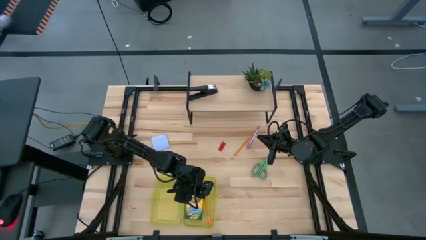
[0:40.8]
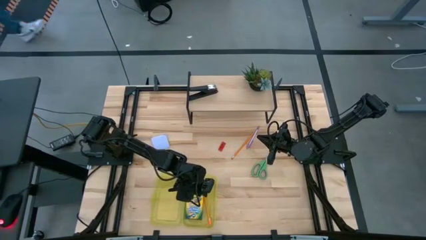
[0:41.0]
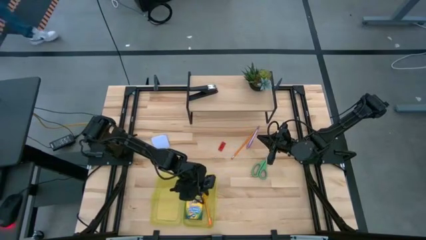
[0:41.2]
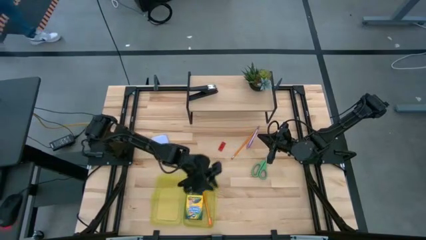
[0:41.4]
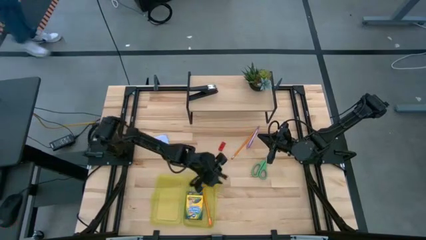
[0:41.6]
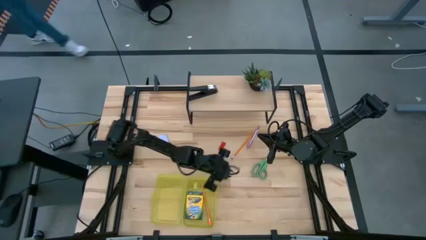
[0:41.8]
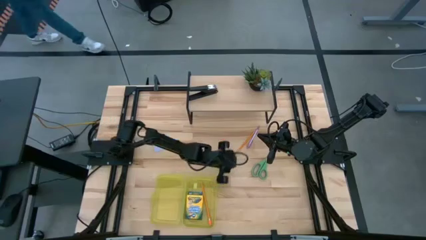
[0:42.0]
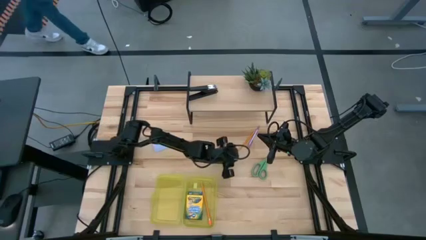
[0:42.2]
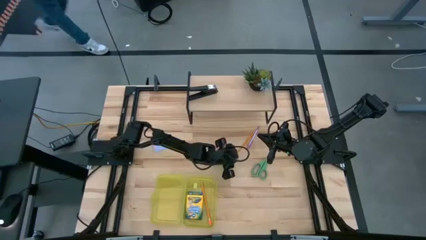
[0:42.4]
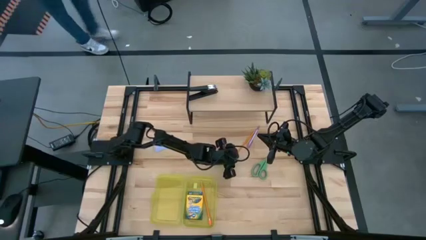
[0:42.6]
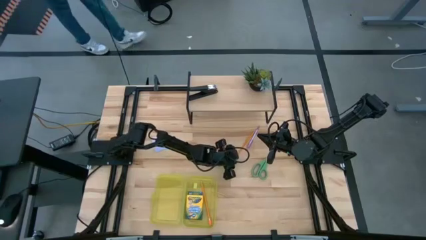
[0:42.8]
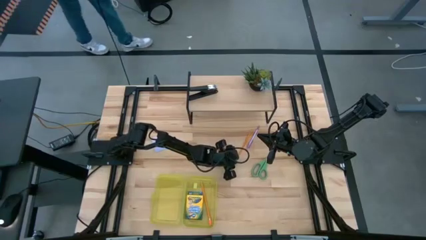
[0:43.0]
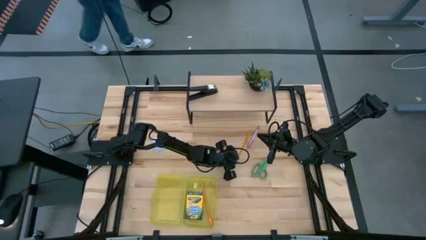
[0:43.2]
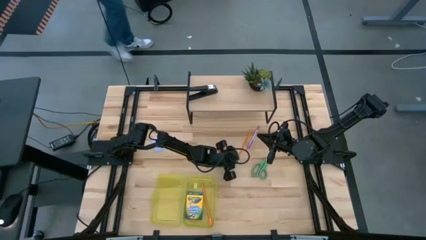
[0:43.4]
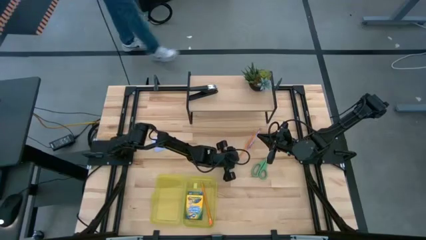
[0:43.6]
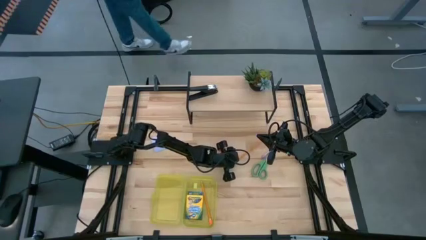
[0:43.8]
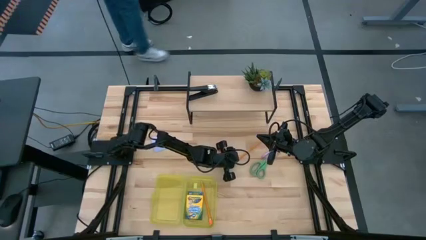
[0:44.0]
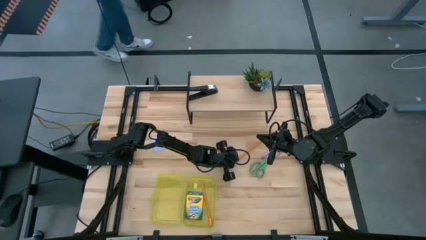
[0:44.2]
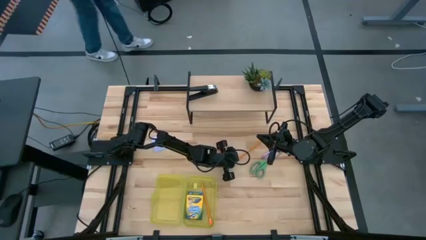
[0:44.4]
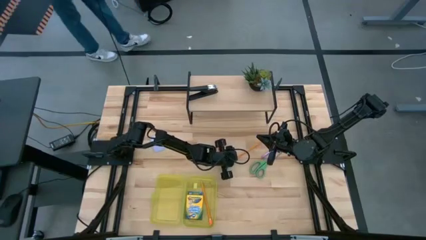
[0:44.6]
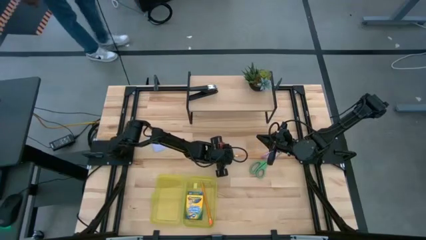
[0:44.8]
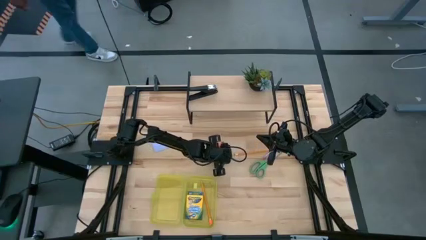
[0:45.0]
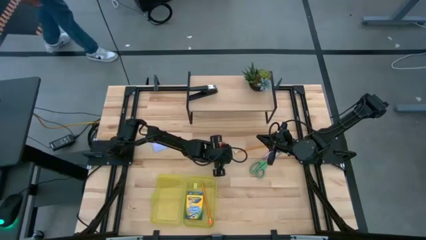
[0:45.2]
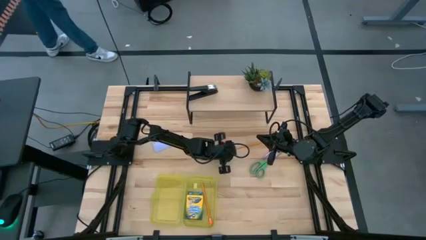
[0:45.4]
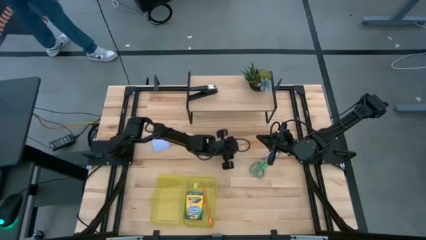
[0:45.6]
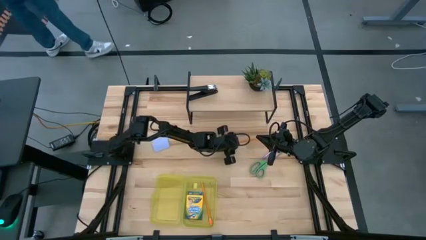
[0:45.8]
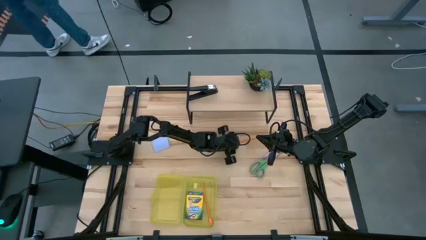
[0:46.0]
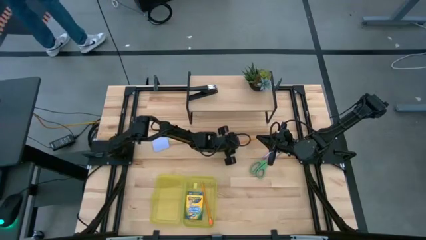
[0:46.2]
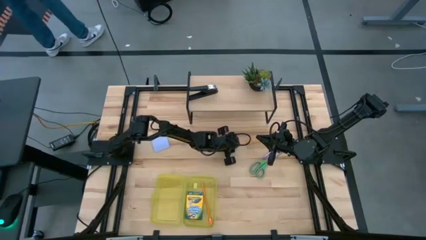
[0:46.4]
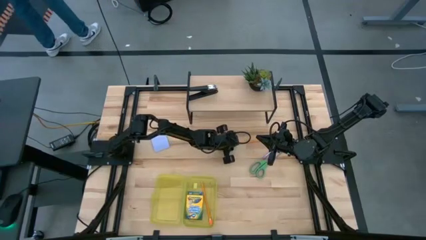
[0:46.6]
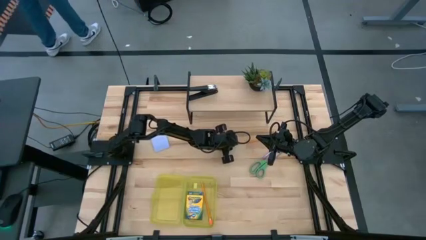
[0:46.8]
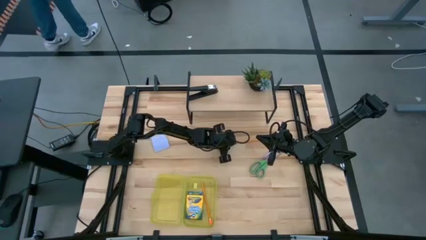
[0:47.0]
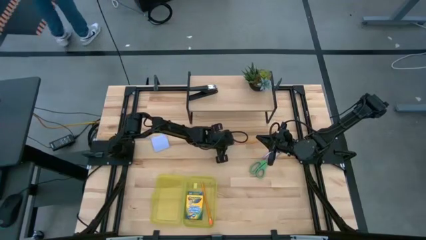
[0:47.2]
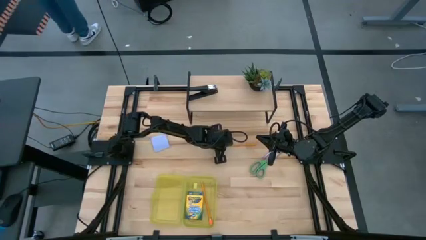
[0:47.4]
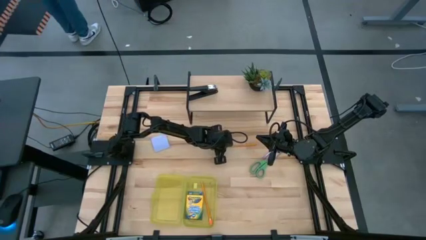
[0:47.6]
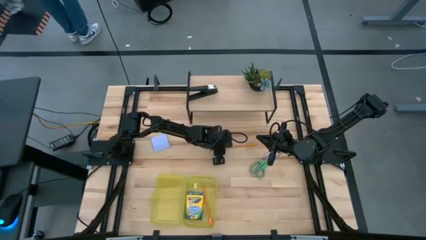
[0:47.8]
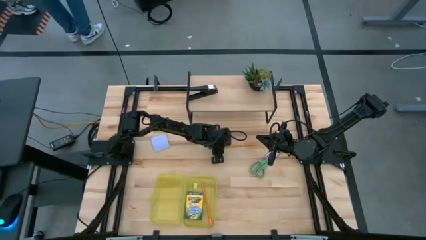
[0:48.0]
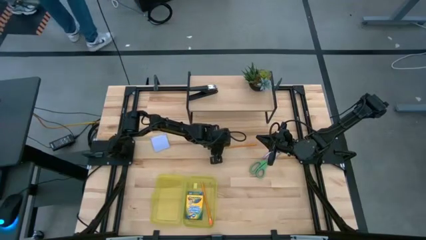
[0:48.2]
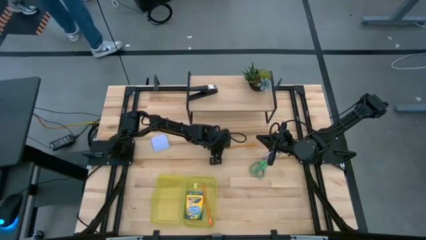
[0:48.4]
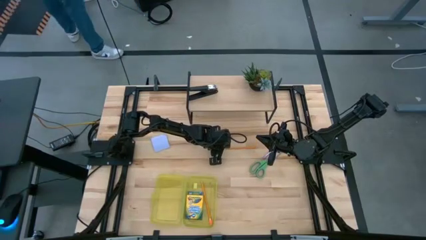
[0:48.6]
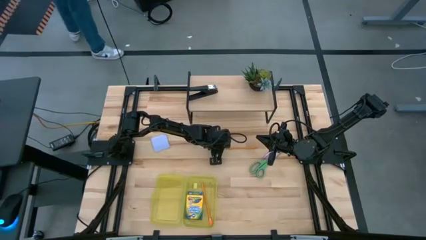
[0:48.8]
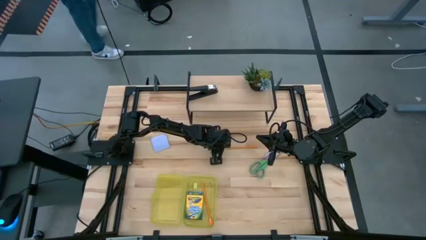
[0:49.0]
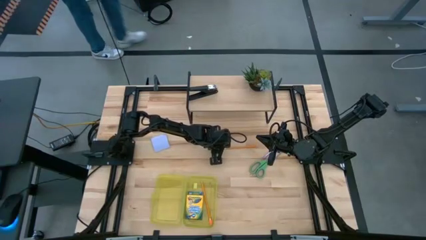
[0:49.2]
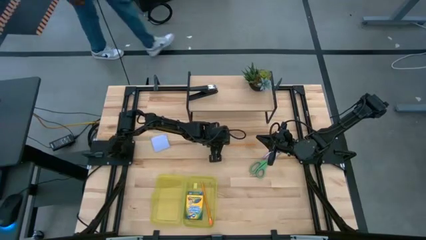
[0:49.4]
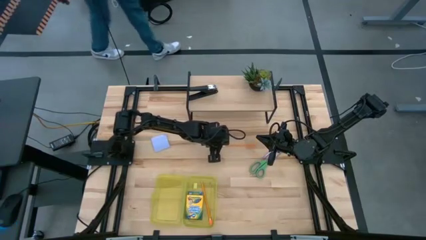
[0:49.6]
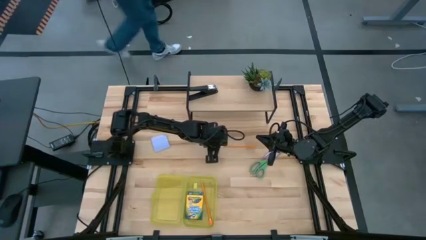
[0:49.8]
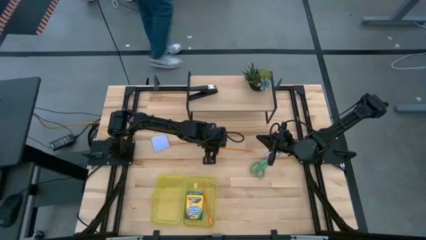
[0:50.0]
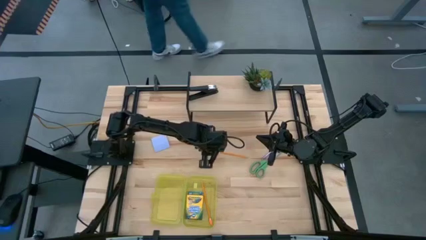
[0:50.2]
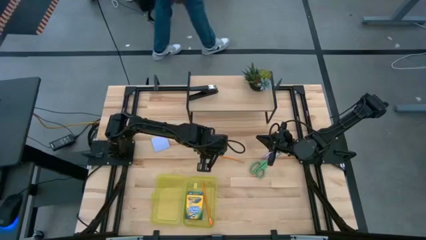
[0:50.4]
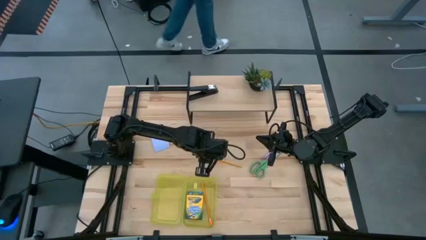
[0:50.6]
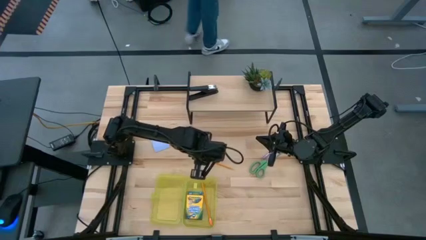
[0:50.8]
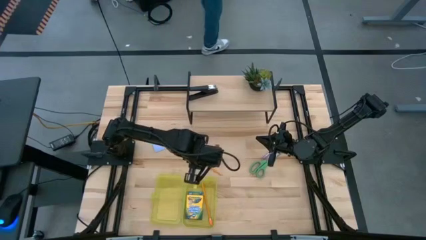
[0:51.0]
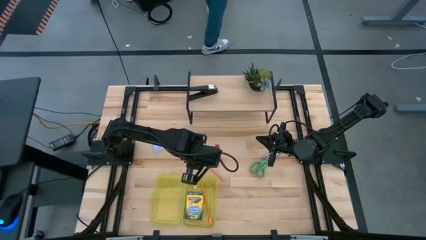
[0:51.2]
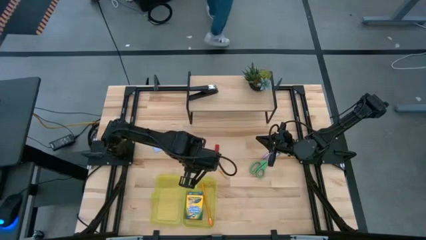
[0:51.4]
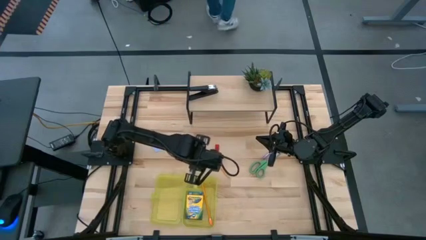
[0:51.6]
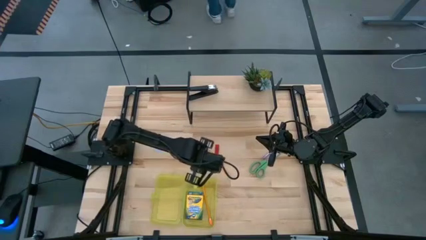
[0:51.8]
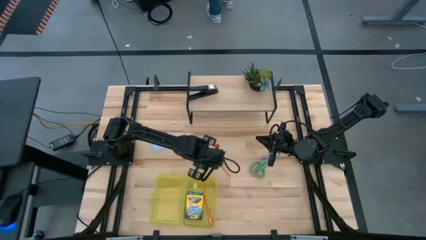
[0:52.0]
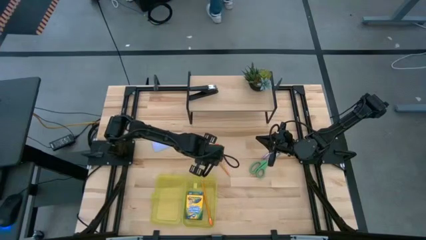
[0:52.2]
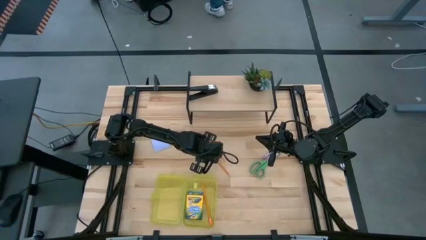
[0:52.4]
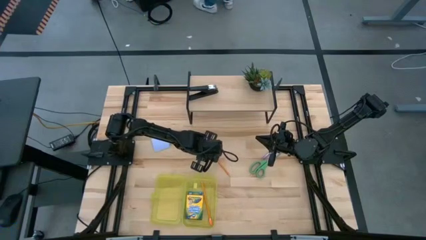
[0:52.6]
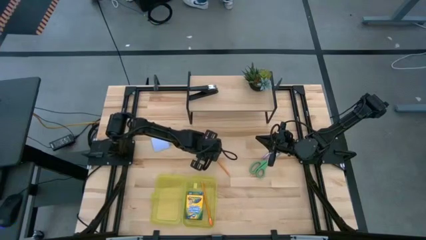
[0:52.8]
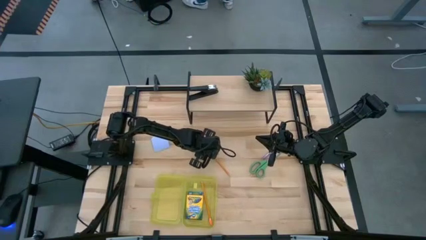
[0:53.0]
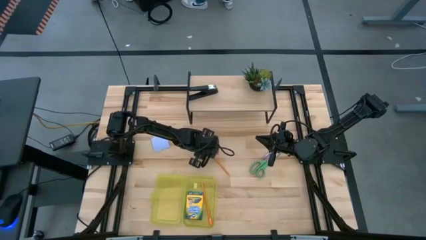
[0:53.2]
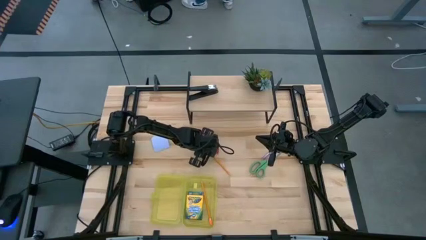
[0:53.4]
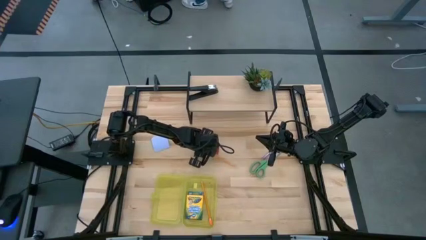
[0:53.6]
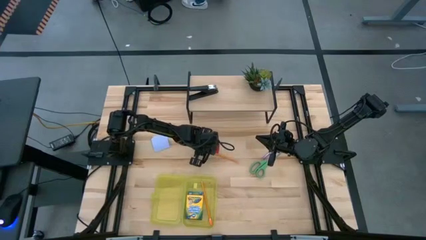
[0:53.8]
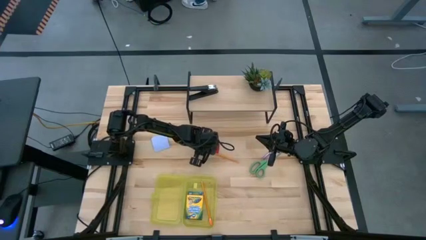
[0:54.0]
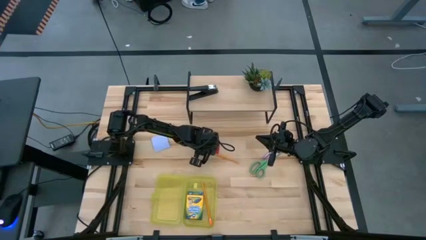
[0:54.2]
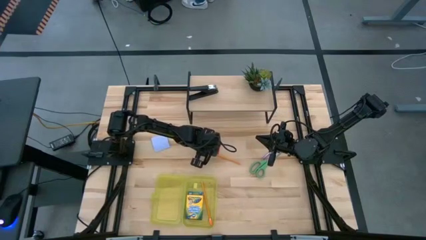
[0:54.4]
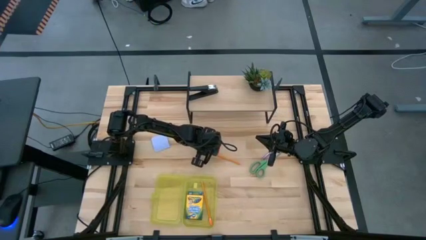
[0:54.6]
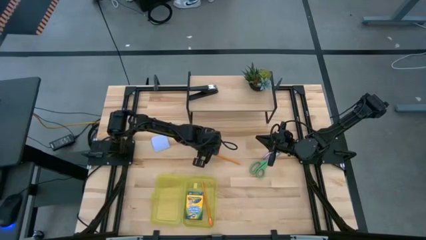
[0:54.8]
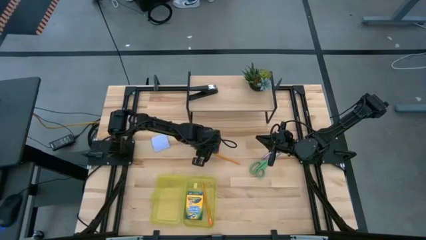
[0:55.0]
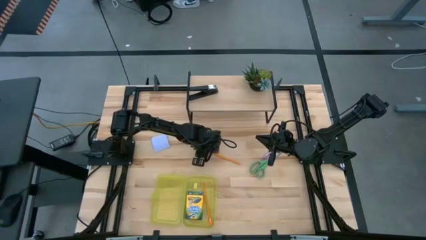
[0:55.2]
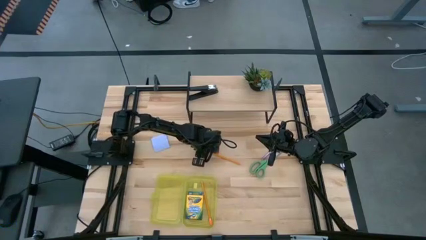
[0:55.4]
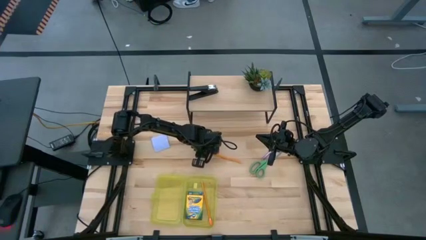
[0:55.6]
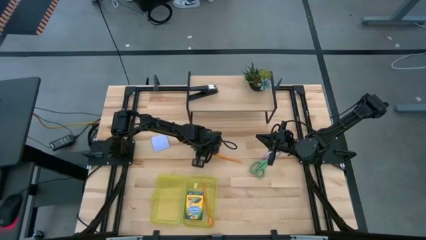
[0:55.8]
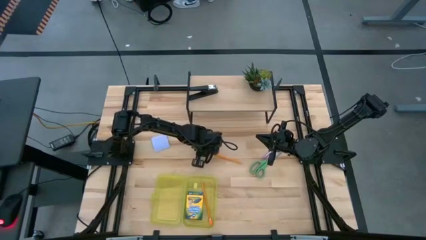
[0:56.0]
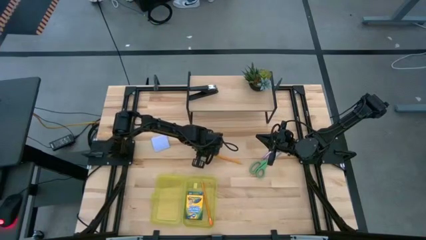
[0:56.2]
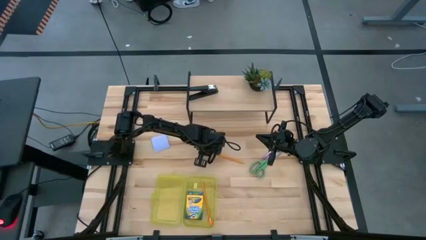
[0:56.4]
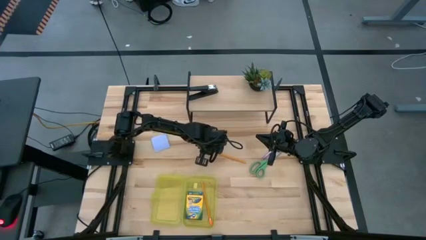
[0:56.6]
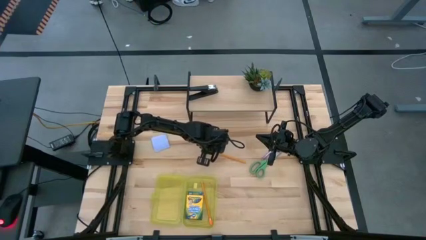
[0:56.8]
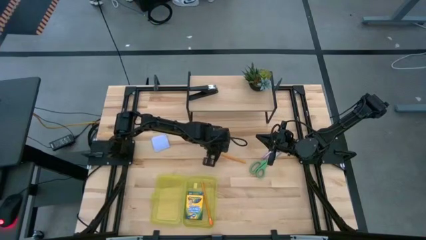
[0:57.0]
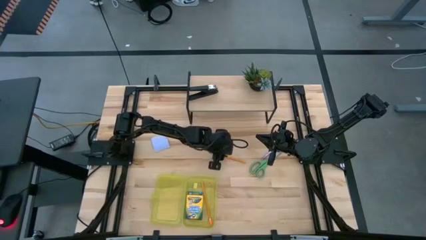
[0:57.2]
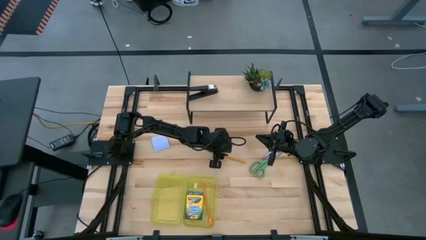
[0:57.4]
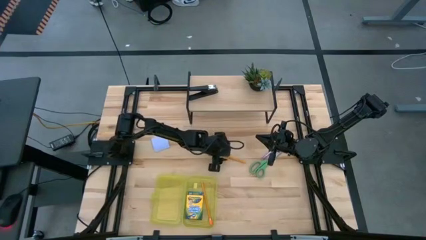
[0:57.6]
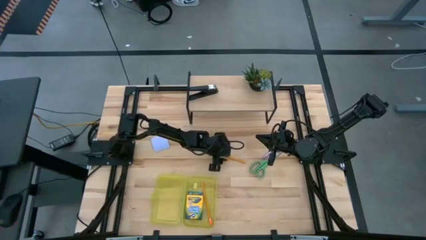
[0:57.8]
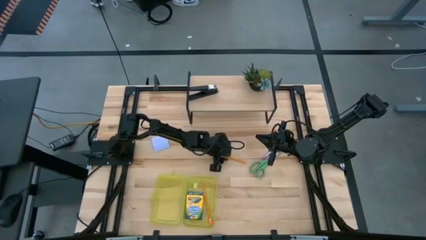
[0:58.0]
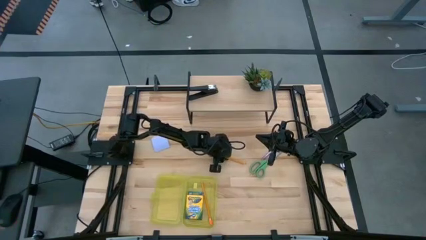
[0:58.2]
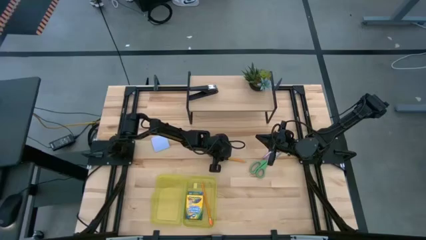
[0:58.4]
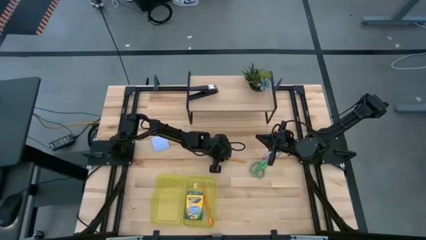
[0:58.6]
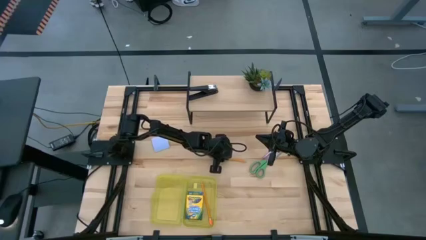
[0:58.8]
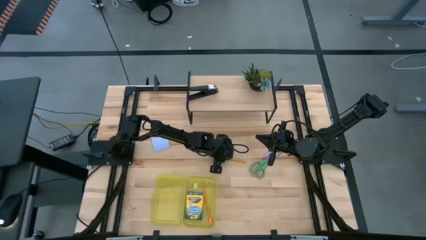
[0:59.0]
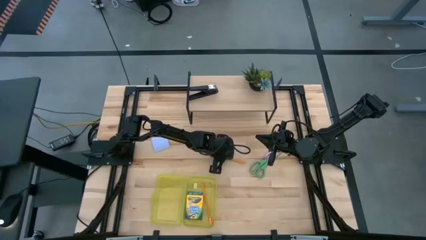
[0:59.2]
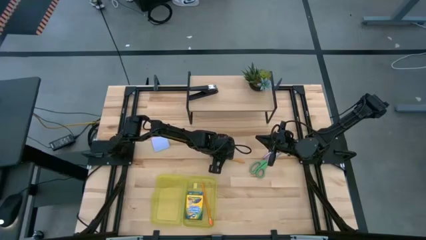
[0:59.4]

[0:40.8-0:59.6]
Task: Pack school essentials
Put the orange pencil into the yellow supply box
